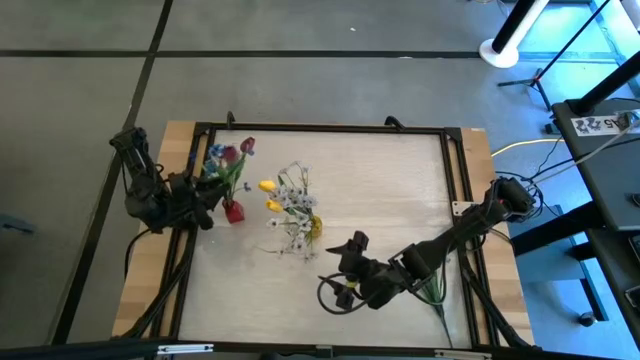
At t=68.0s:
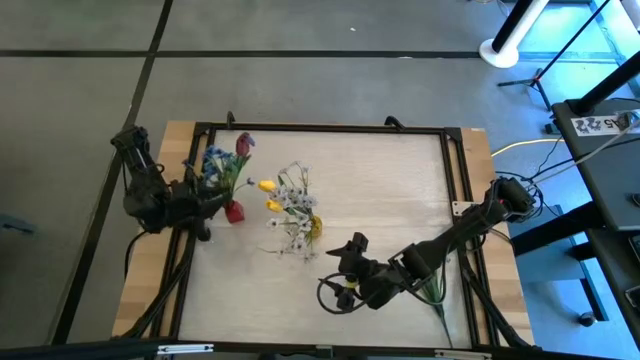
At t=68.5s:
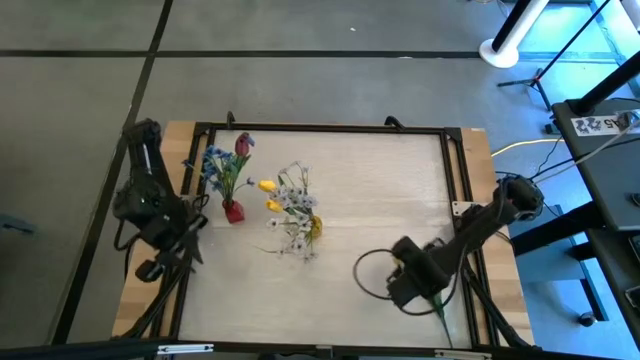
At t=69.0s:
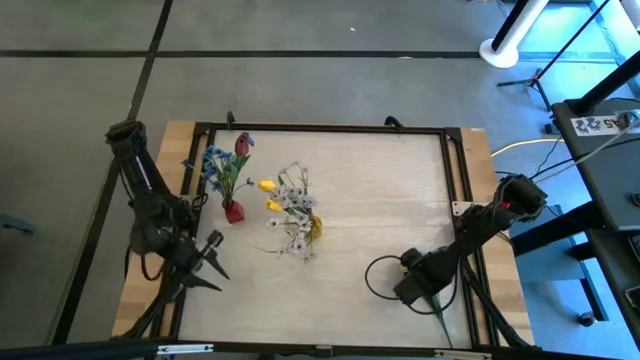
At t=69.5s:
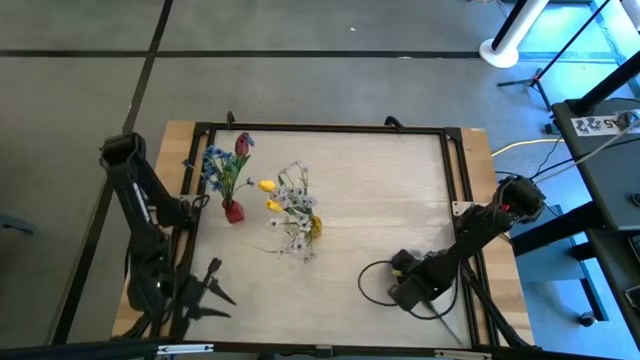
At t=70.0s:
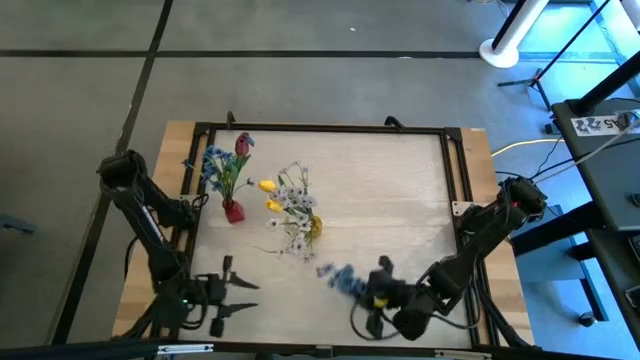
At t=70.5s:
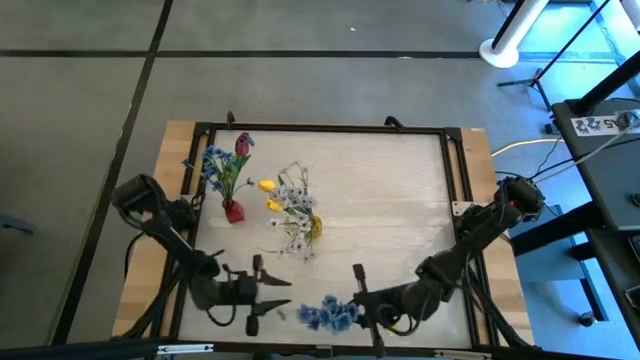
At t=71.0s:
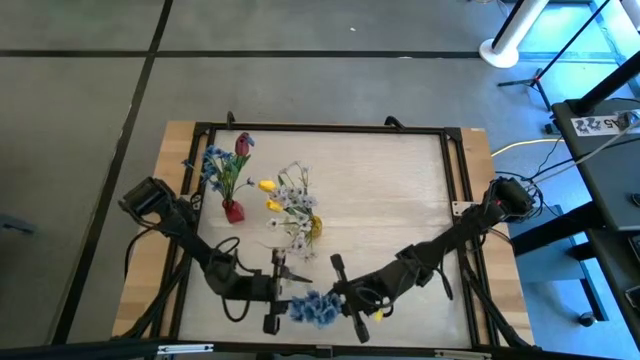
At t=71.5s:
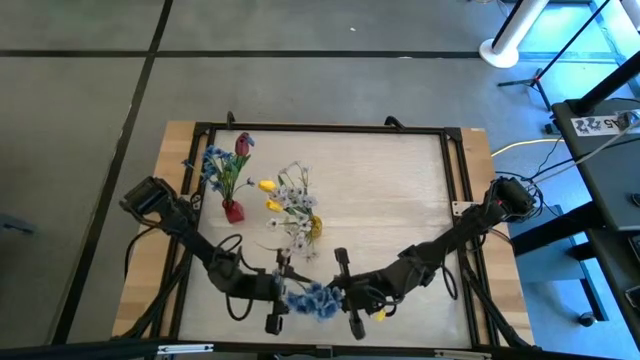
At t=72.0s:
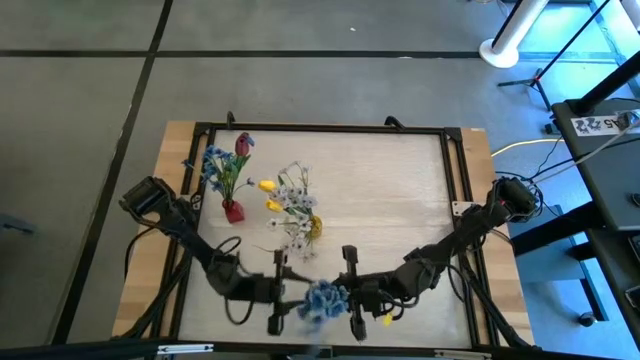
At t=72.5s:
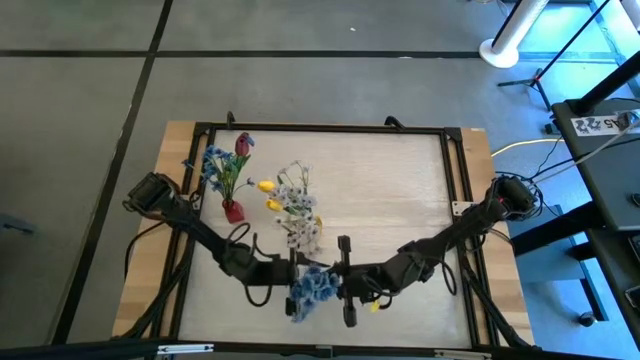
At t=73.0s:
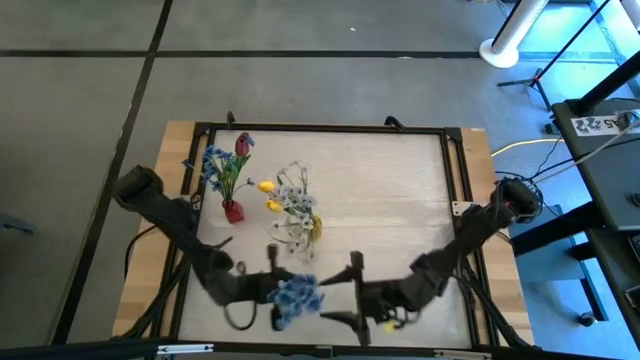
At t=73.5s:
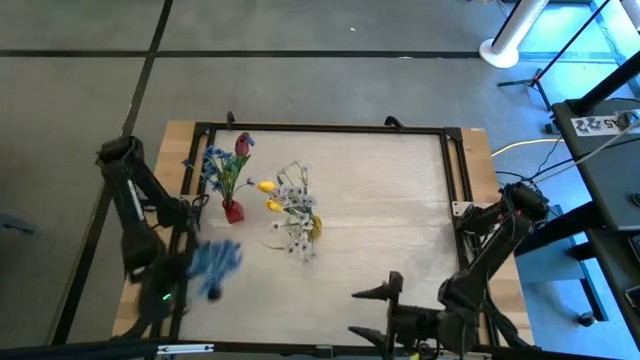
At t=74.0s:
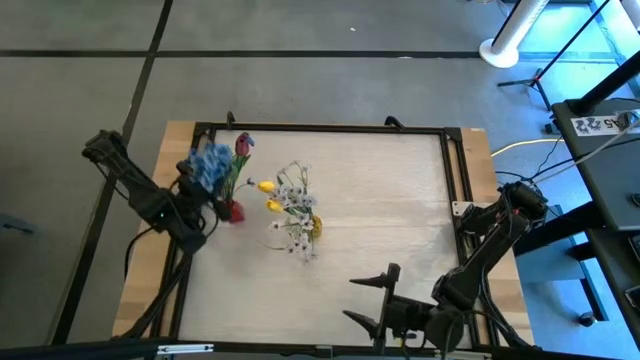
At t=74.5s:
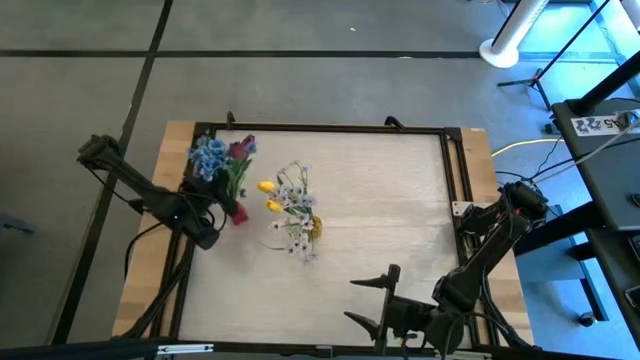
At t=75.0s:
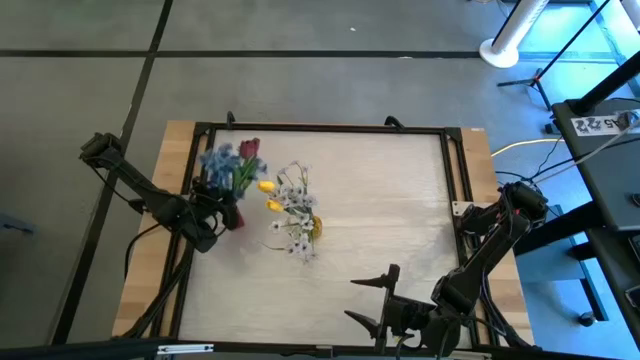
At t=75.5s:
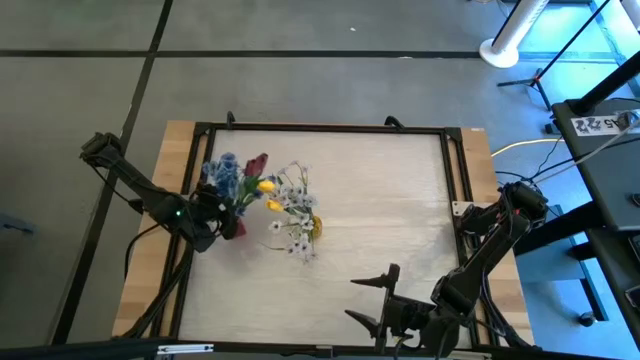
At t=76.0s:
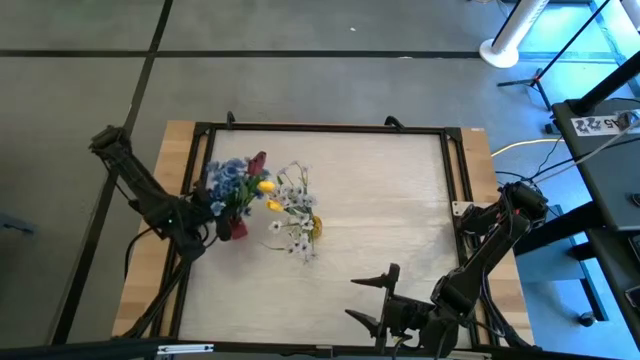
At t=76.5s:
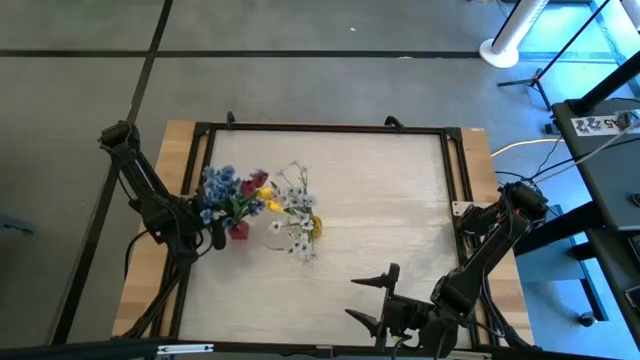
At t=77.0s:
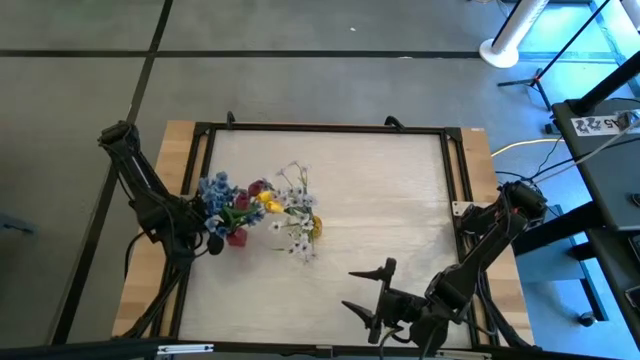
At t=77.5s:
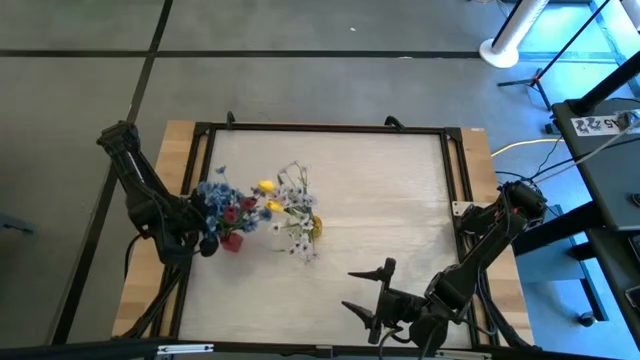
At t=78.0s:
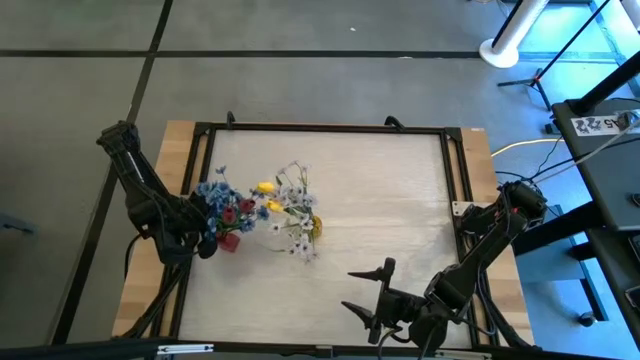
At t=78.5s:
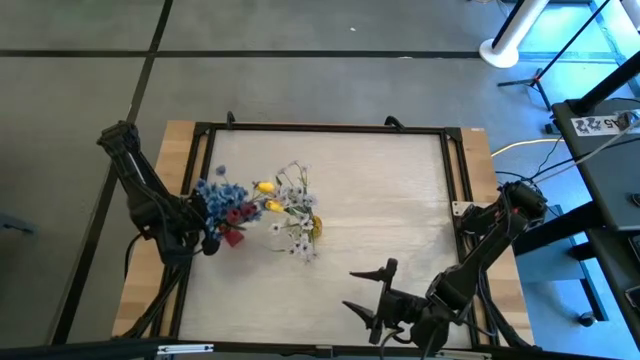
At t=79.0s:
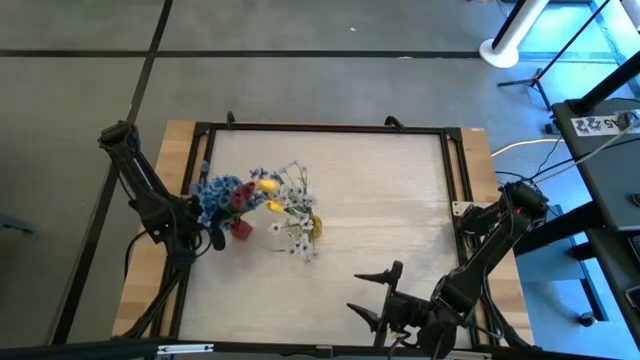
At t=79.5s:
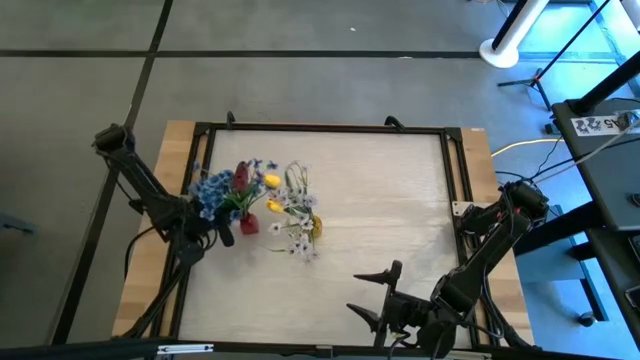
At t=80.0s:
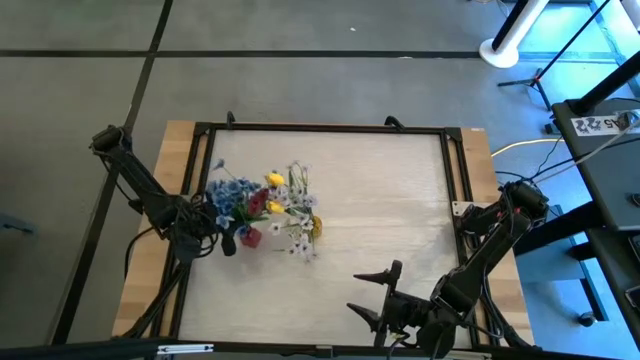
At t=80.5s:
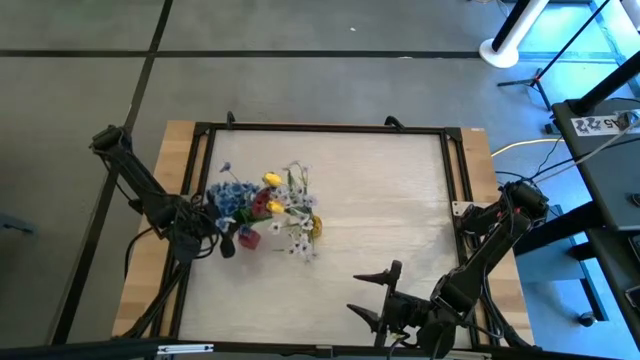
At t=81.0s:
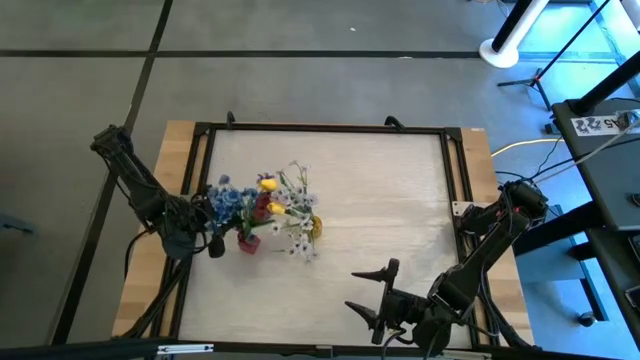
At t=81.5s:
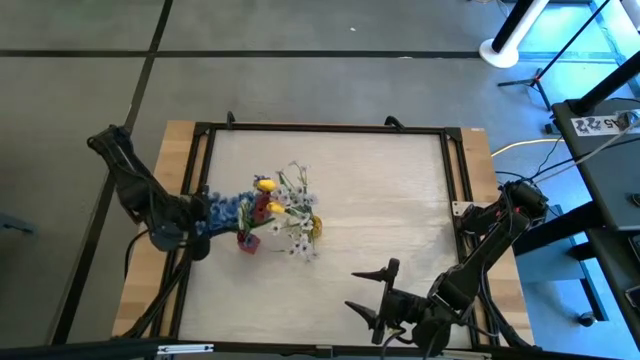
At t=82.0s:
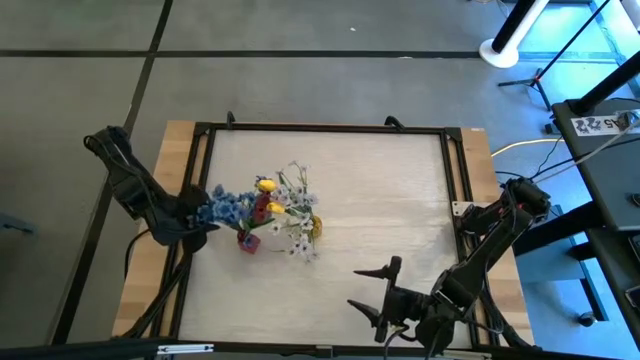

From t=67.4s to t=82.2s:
Task: Sort flowers into vase by color
Put the blue flowers into the red flower vase

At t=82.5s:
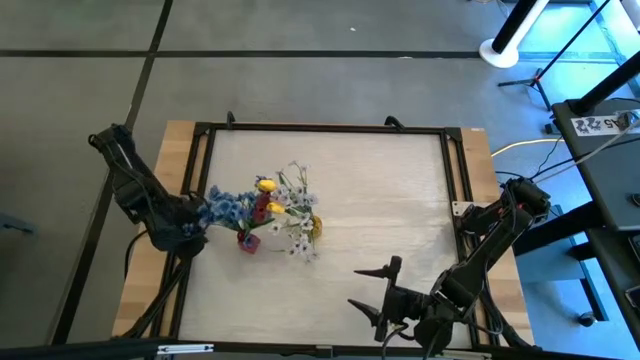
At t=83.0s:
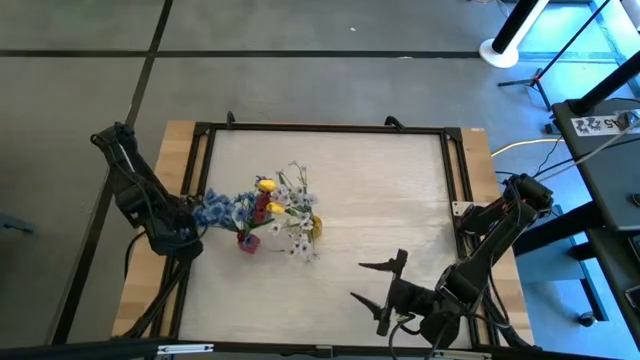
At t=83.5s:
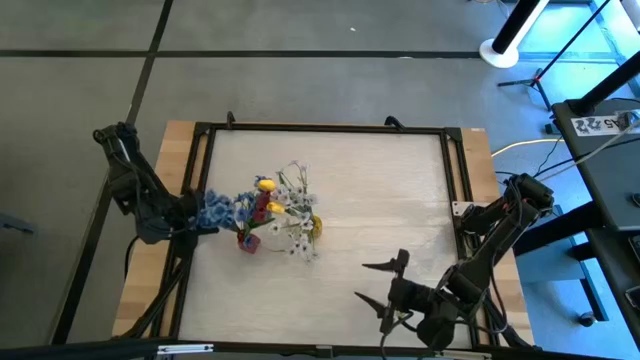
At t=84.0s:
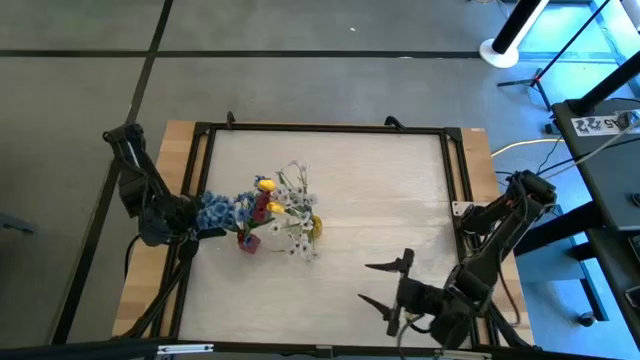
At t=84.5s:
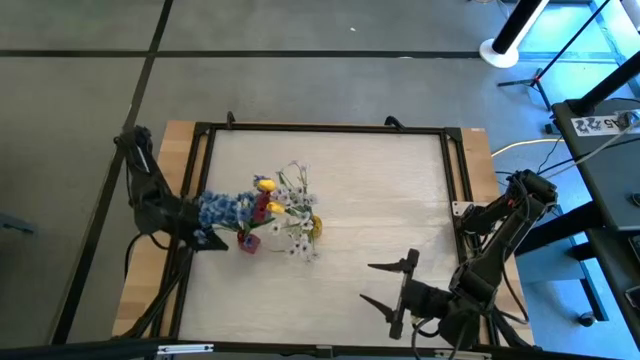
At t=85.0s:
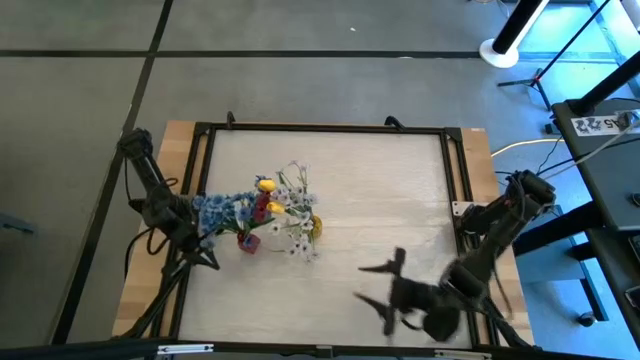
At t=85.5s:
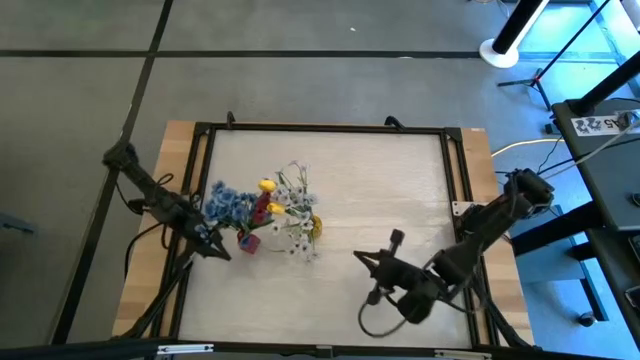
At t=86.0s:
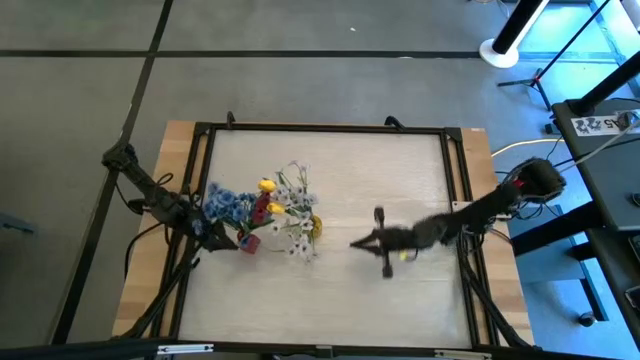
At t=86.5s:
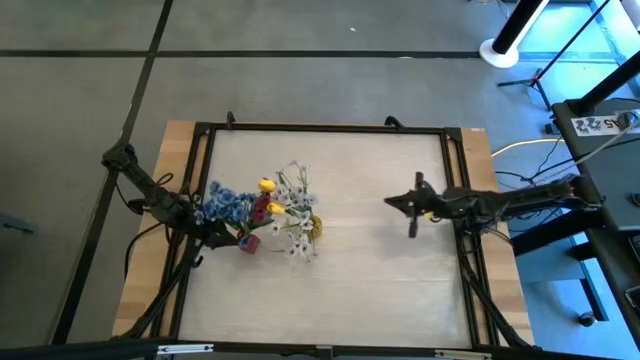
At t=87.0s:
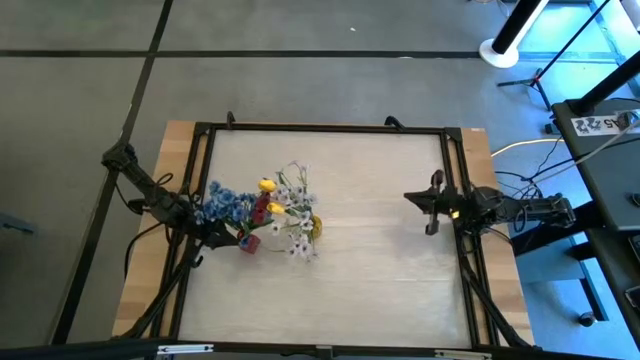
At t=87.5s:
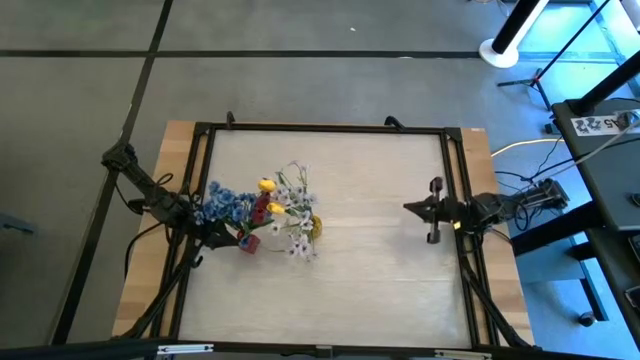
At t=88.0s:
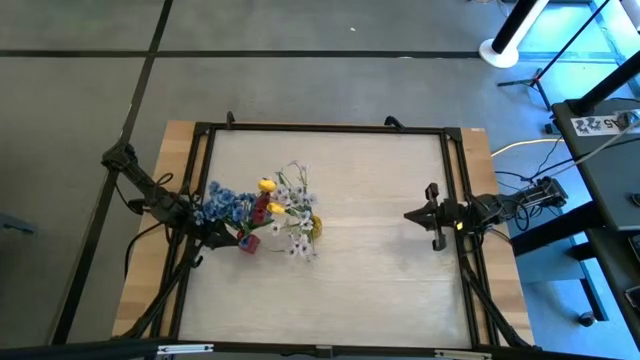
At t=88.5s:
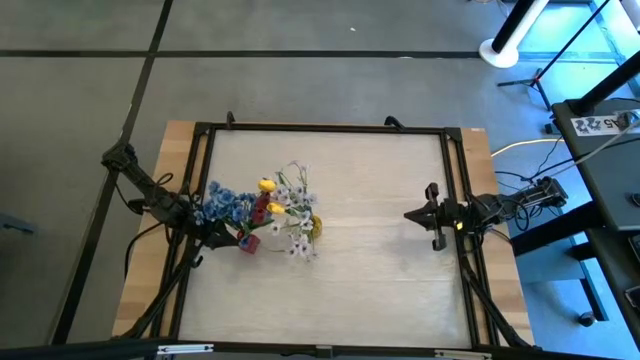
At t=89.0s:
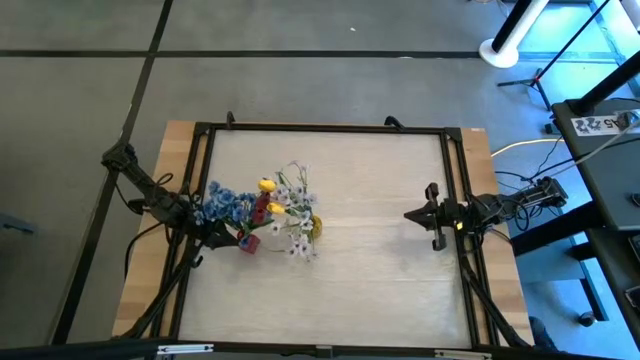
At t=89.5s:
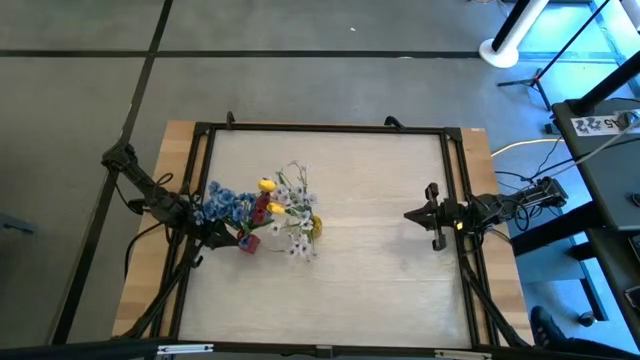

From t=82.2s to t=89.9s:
Return to Home Position
